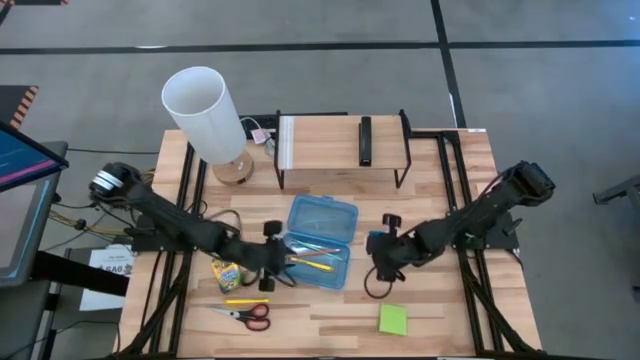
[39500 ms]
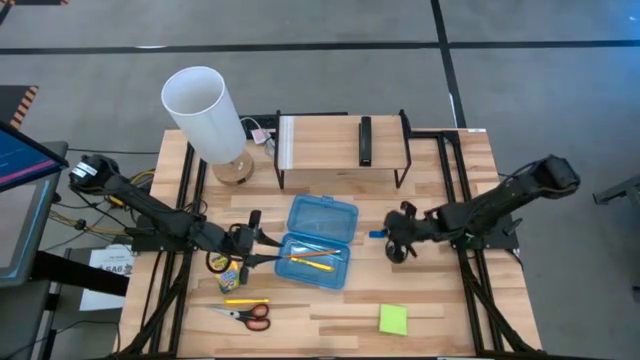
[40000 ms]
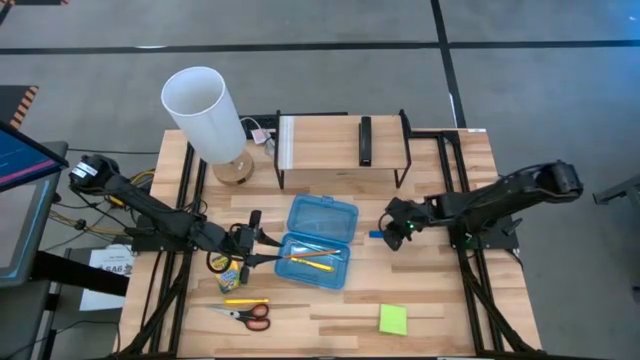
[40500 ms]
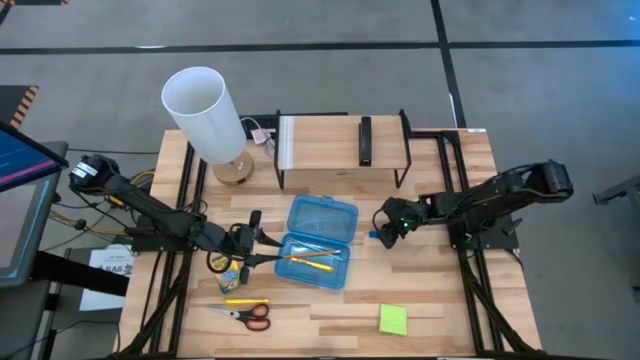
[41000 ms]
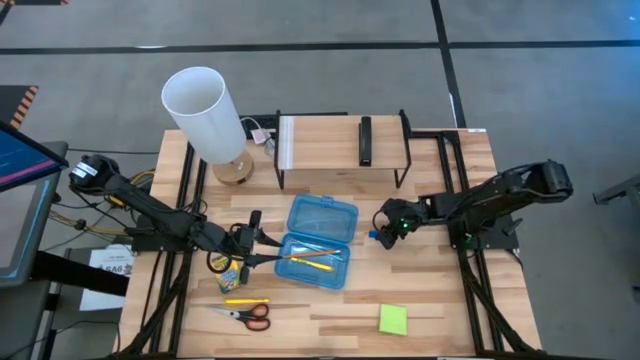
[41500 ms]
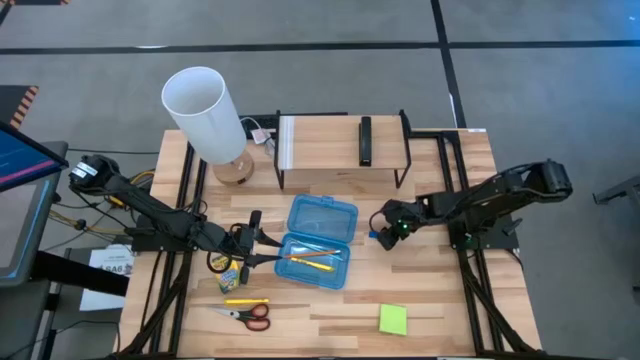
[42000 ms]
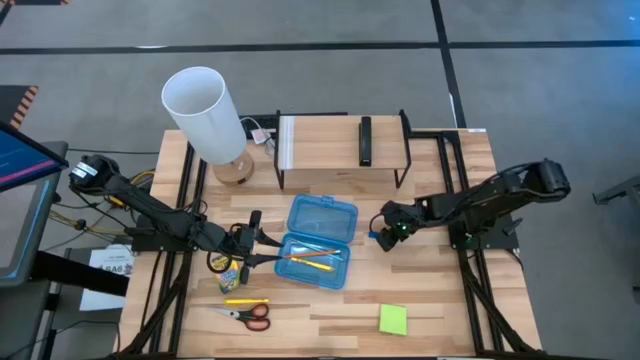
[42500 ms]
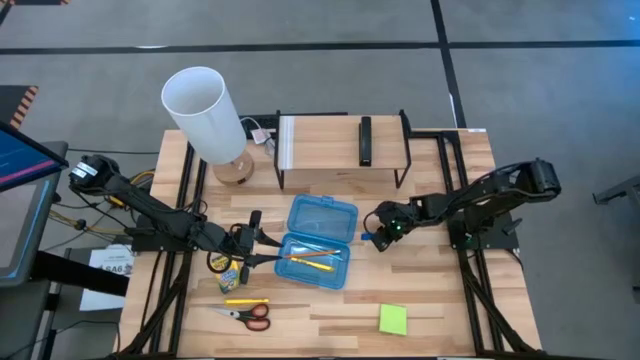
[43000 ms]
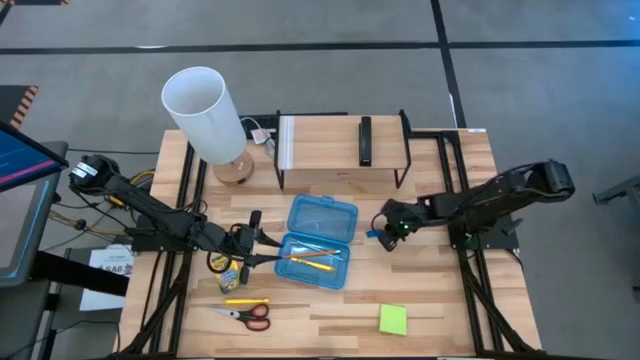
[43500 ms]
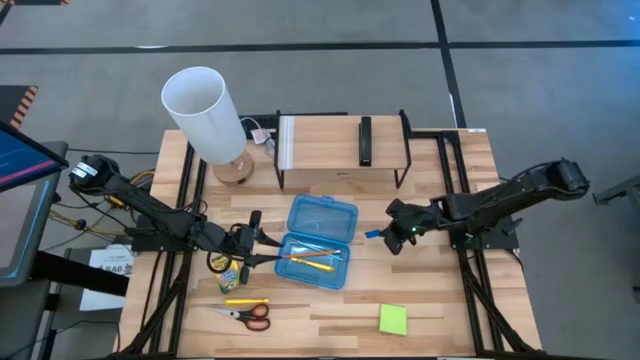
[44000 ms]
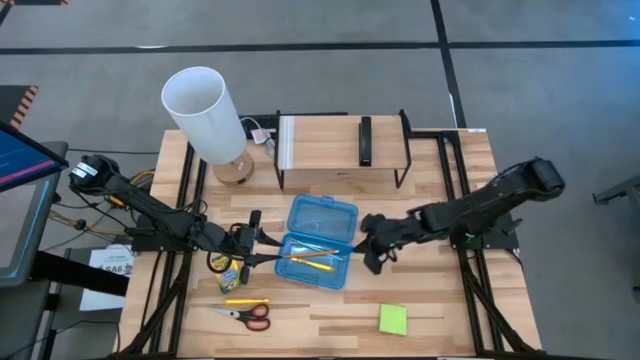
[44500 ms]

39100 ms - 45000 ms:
Task: Pack school essentials
Put the blue eraser into the blue supply box

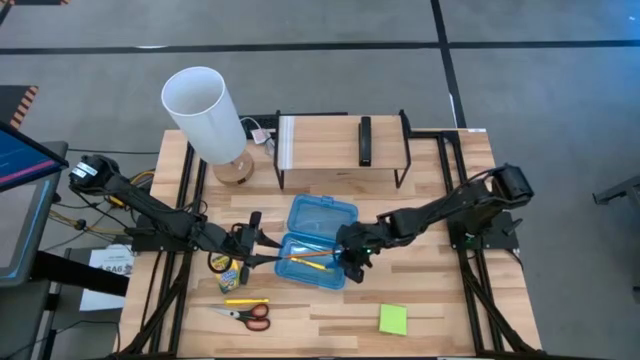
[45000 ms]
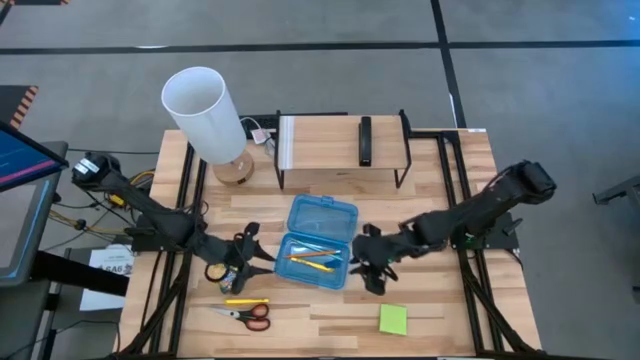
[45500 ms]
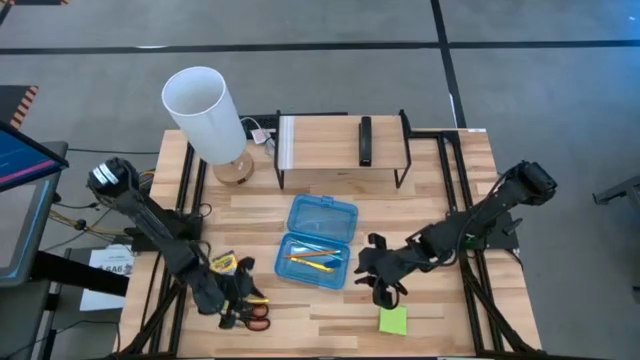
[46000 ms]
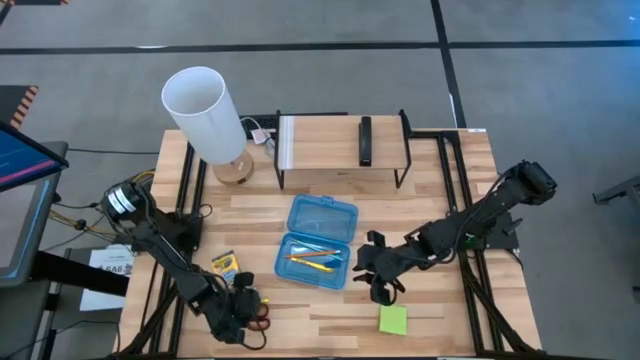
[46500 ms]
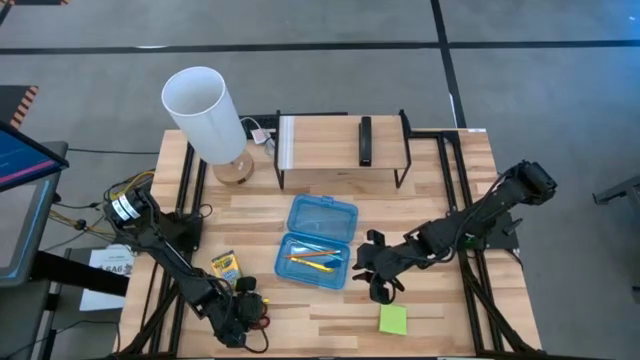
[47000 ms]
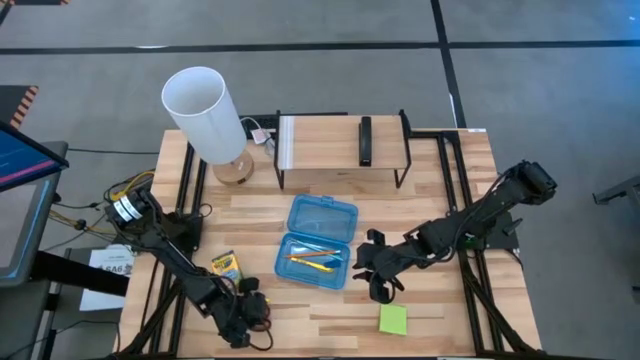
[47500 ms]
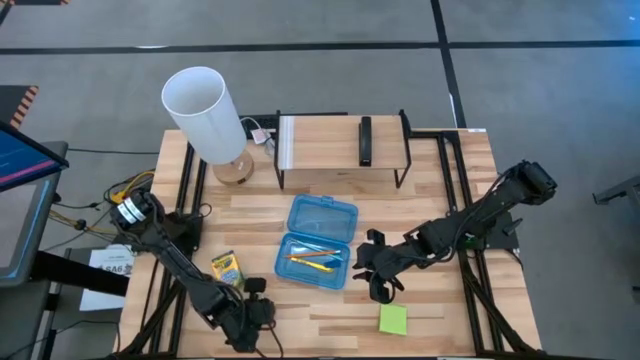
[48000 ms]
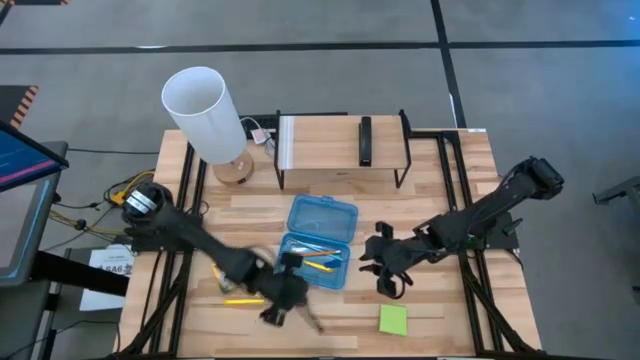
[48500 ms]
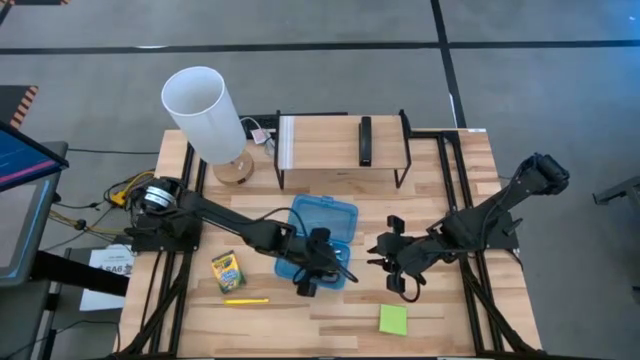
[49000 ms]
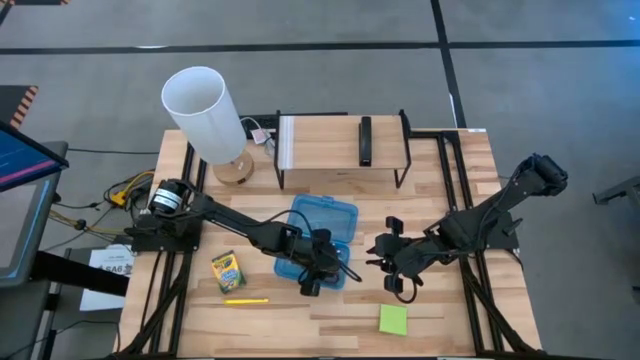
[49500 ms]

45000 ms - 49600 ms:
Put the black scissors into the blue supply box

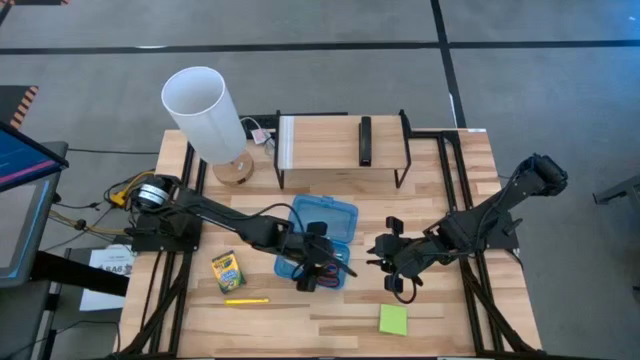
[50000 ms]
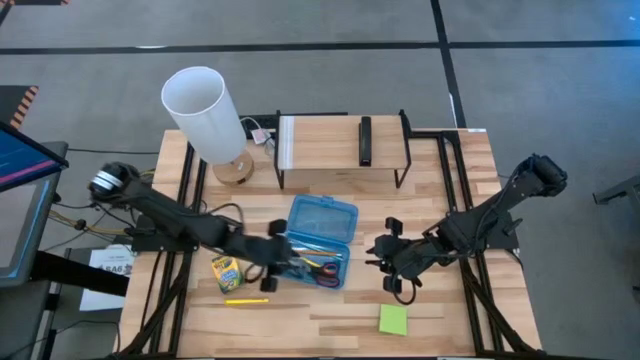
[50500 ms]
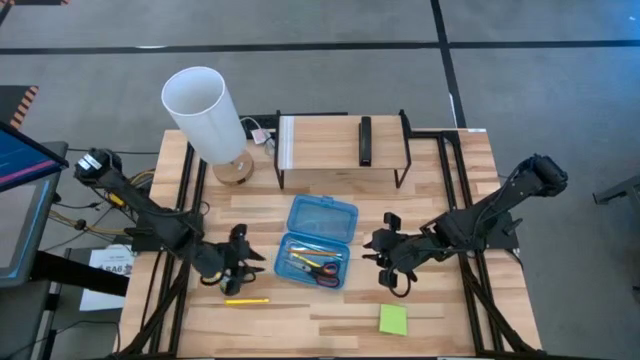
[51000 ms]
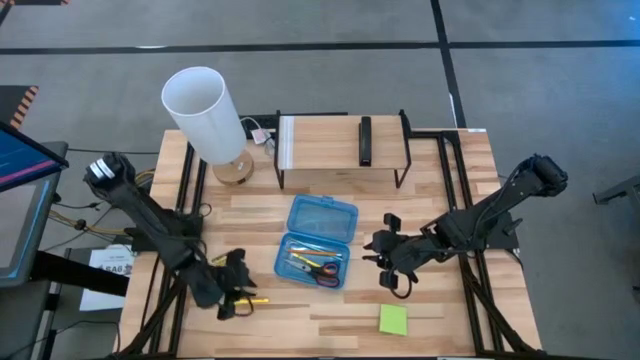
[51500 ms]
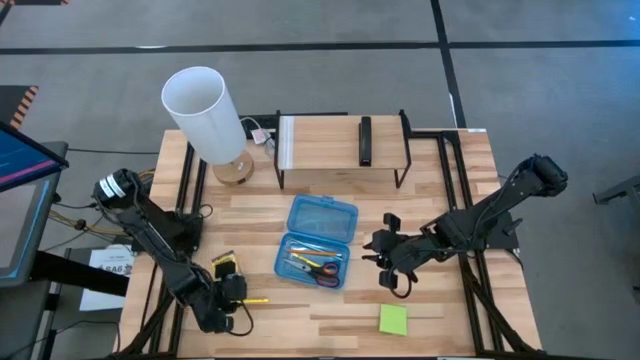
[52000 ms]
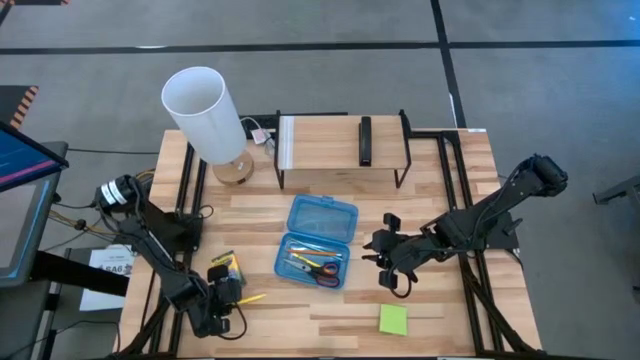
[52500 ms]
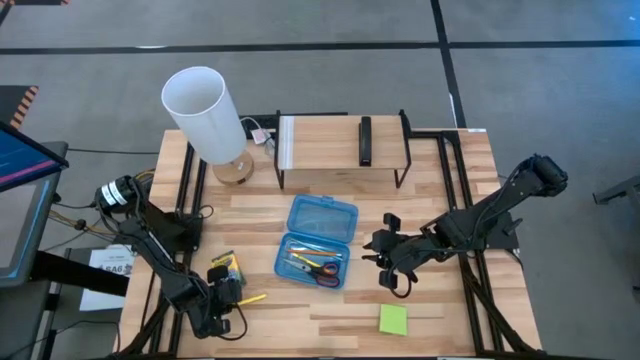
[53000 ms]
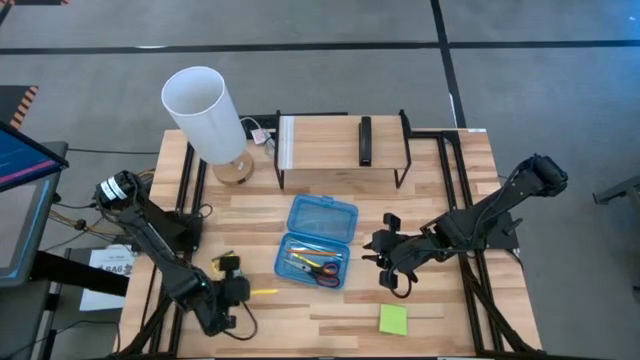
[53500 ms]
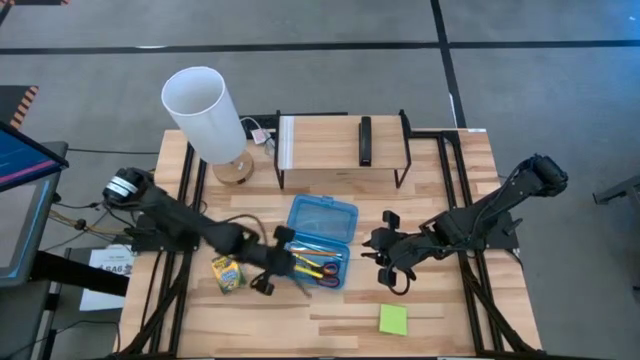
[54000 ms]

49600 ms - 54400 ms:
Put the yellow pen into the blue supply box

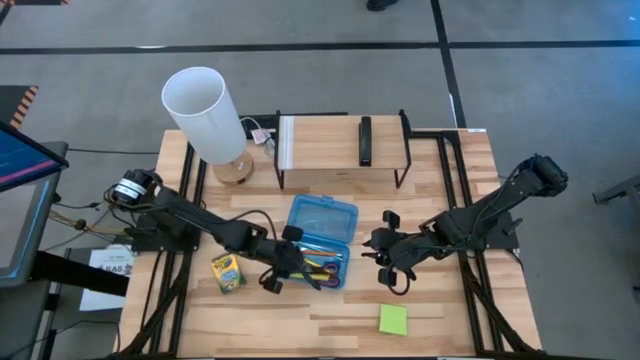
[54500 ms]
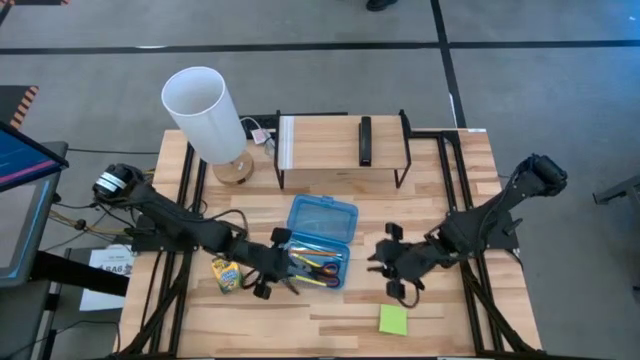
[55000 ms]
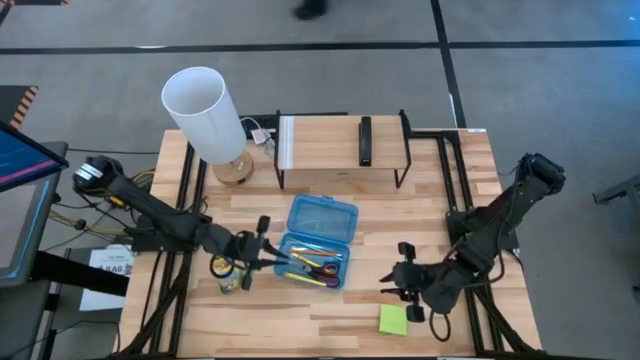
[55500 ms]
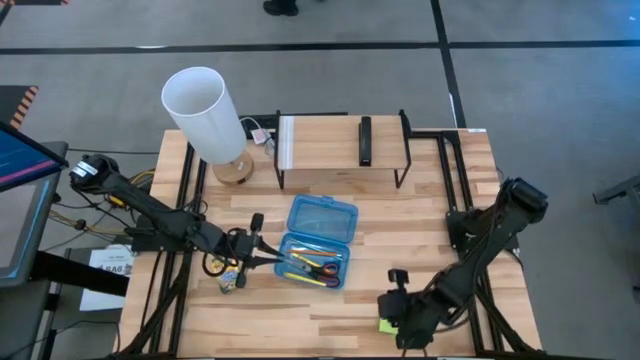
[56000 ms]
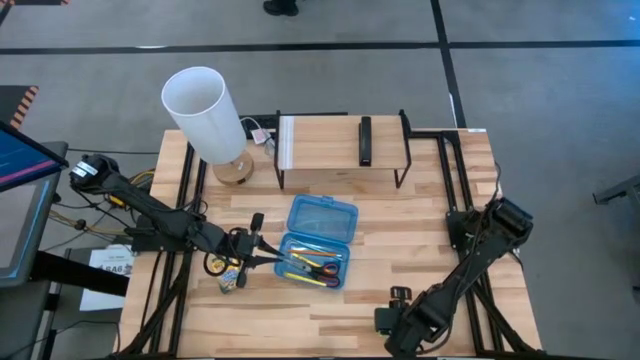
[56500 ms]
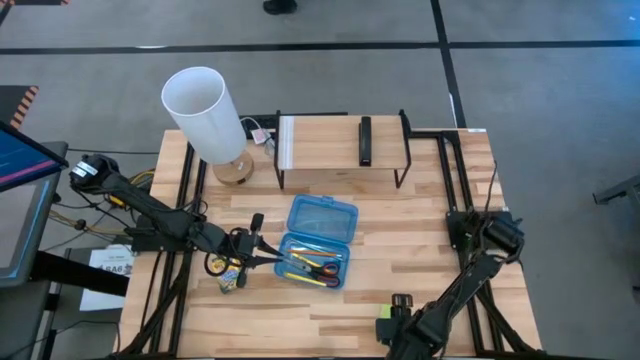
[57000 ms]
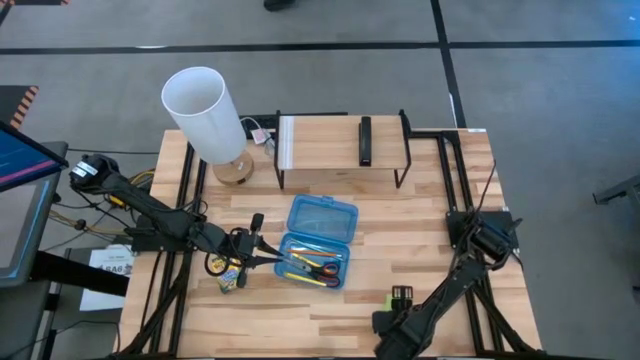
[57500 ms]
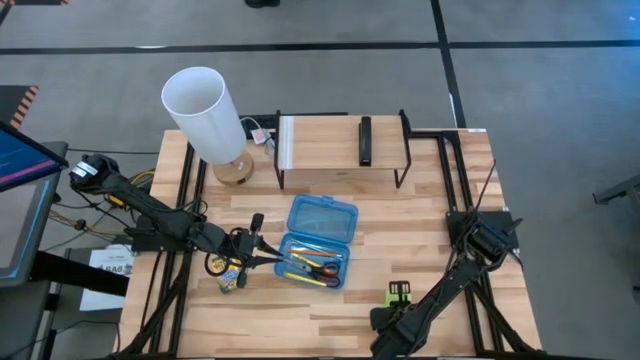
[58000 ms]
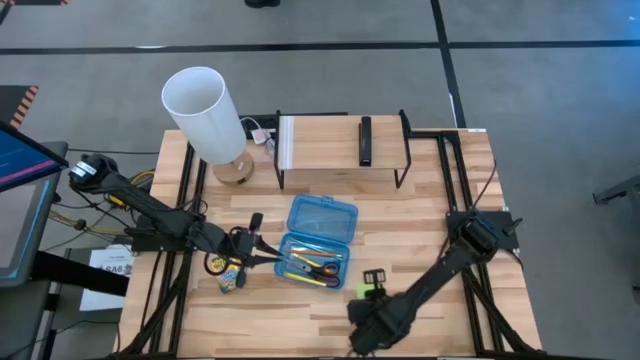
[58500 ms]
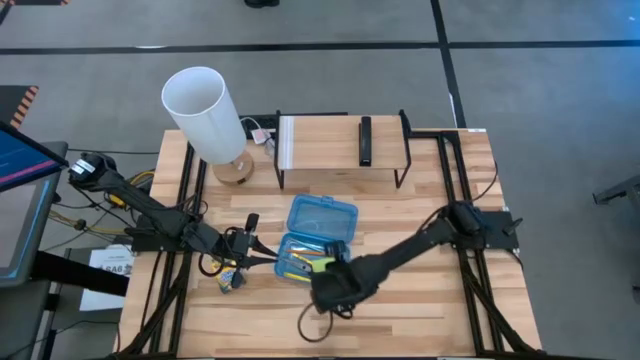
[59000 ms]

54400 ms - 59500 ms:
Put the light green sticky notes into the blue supply box
